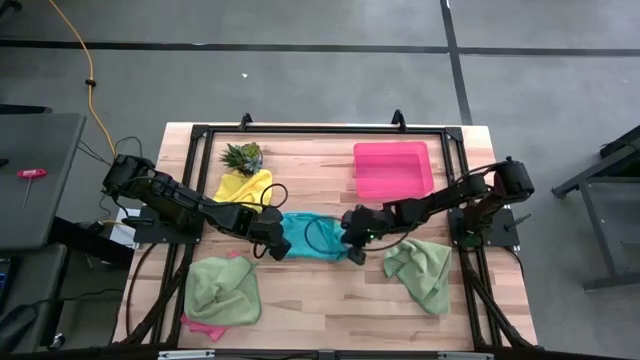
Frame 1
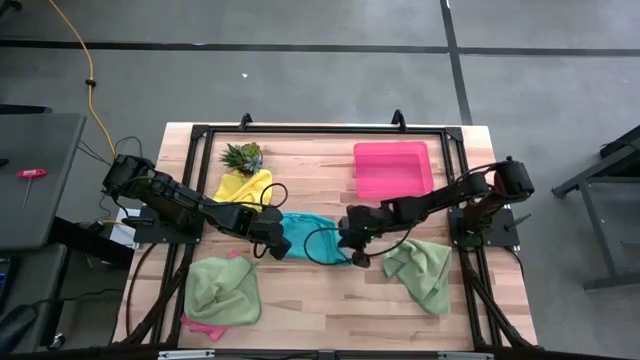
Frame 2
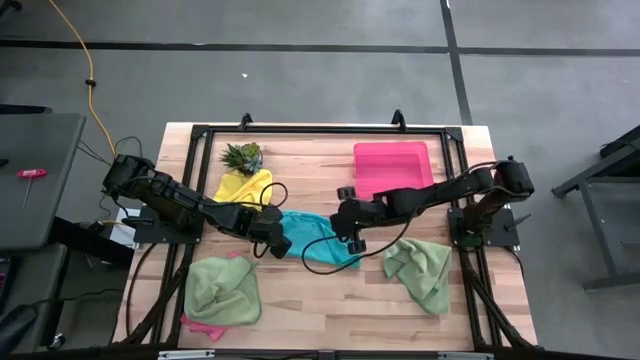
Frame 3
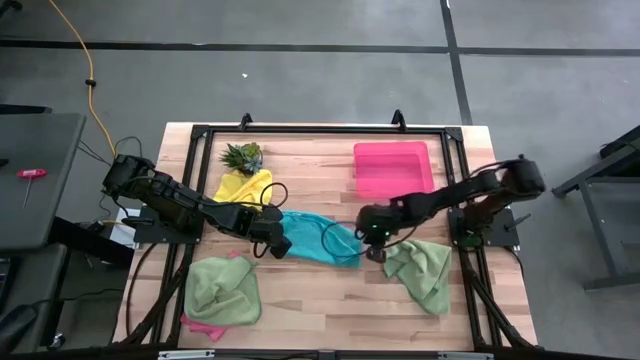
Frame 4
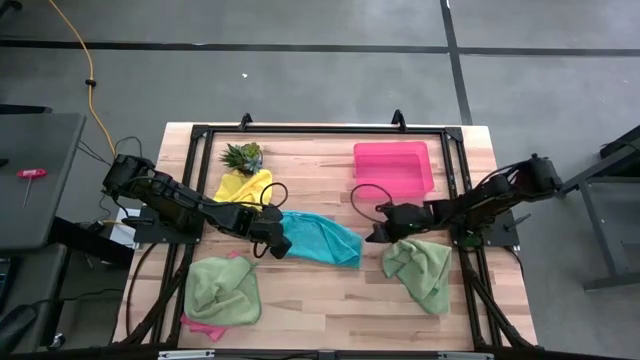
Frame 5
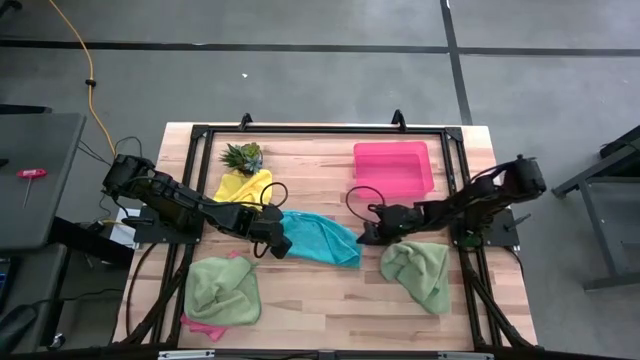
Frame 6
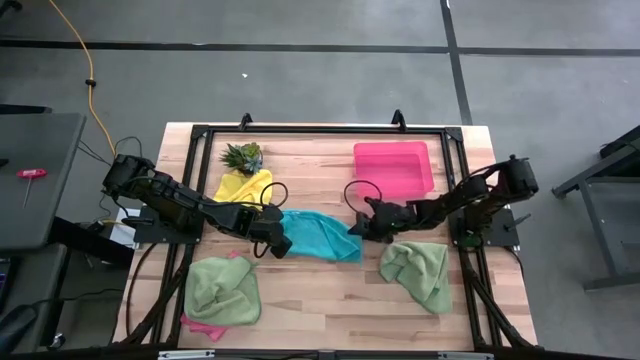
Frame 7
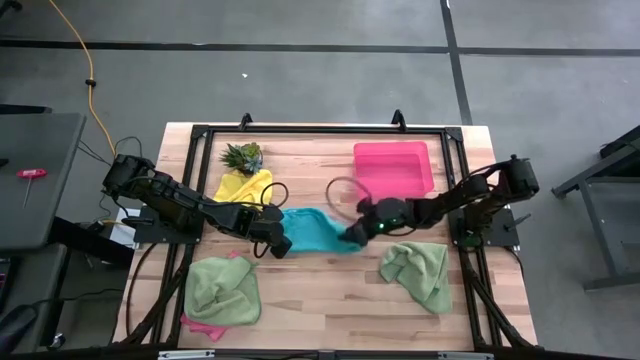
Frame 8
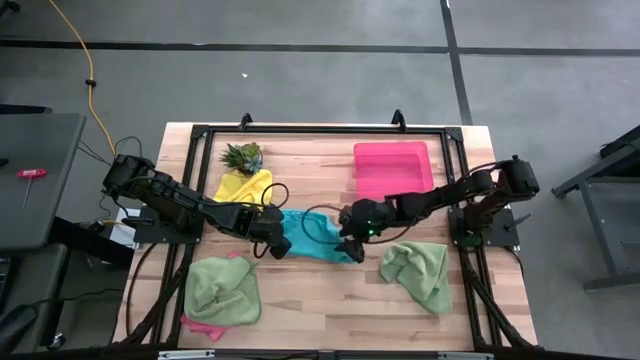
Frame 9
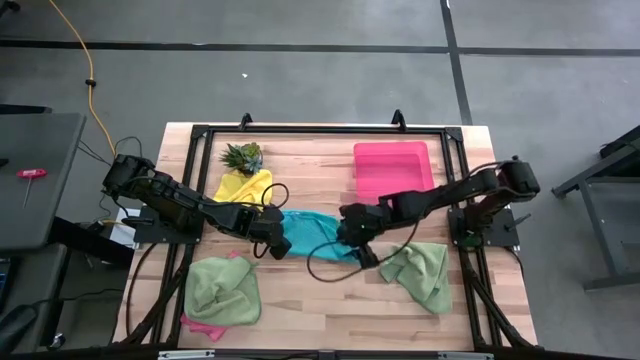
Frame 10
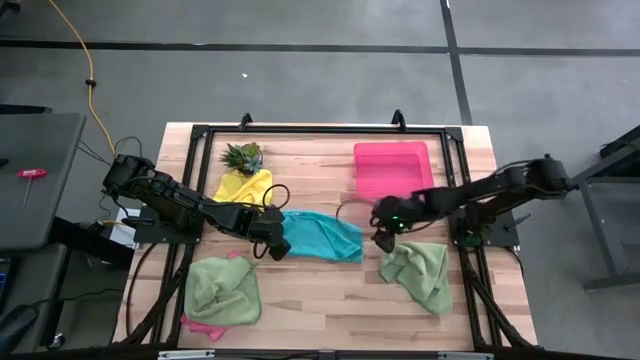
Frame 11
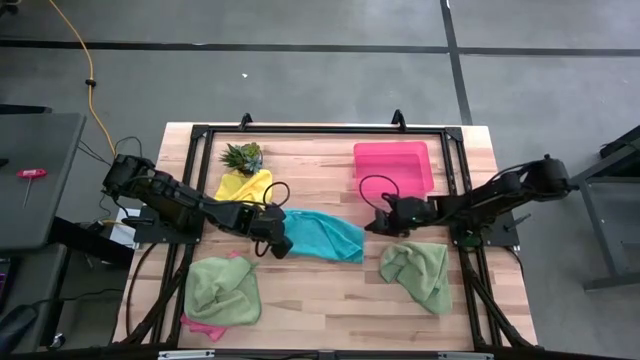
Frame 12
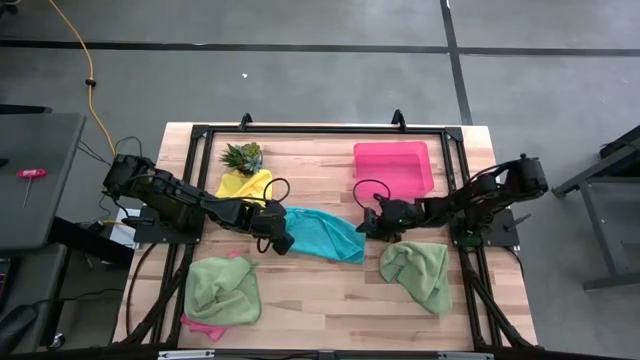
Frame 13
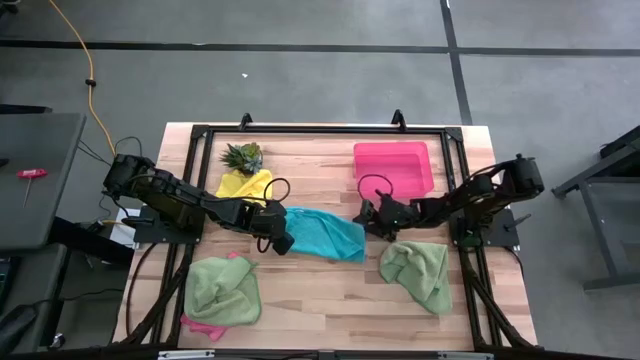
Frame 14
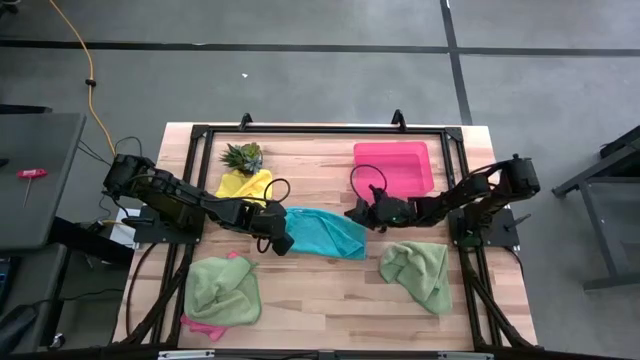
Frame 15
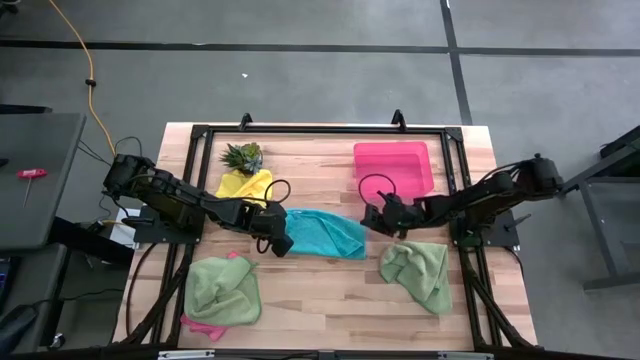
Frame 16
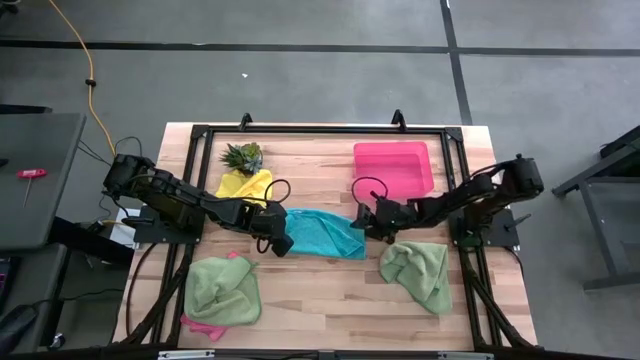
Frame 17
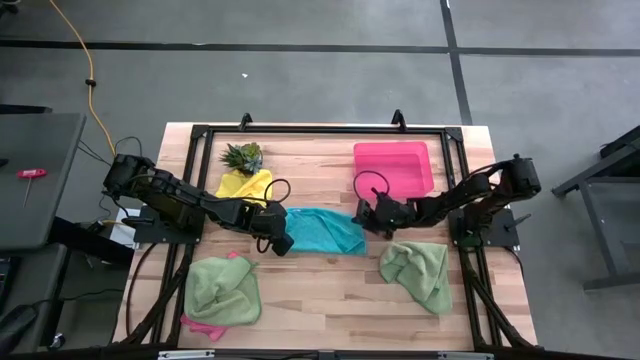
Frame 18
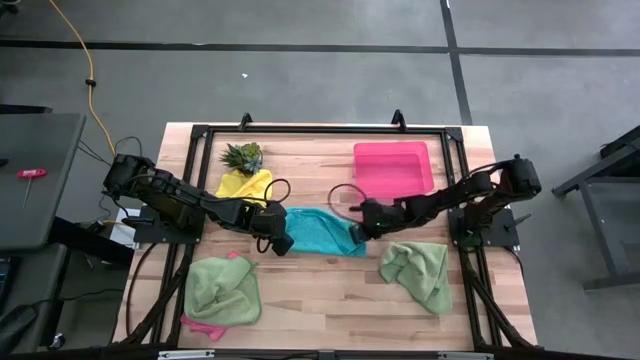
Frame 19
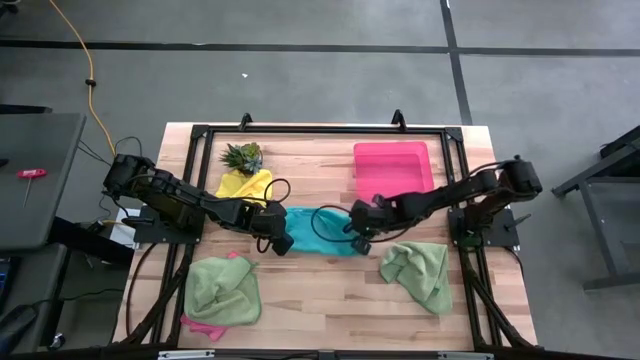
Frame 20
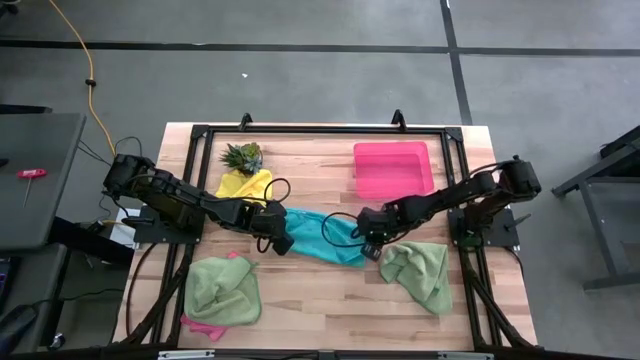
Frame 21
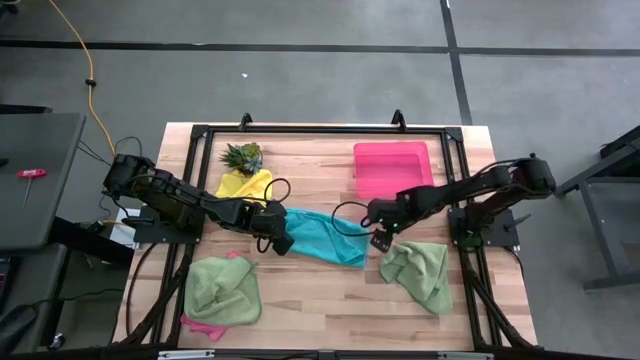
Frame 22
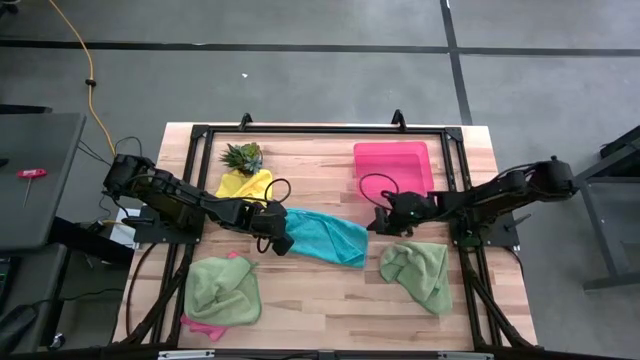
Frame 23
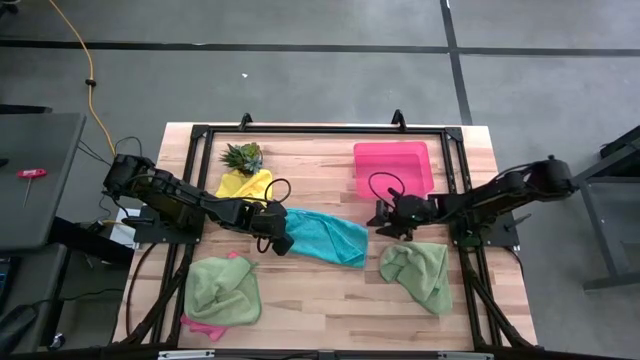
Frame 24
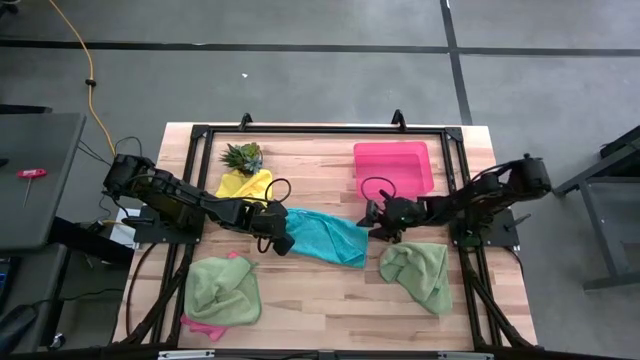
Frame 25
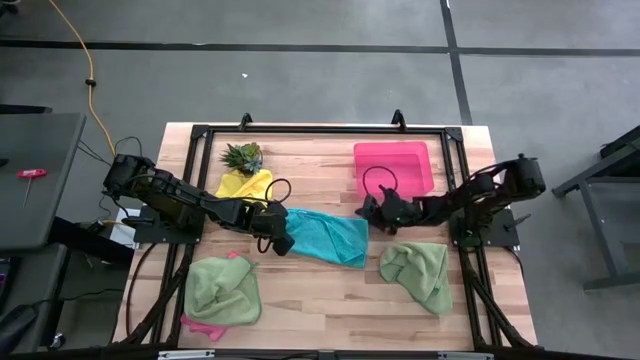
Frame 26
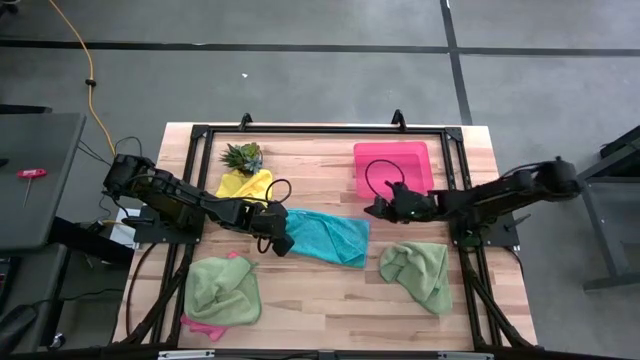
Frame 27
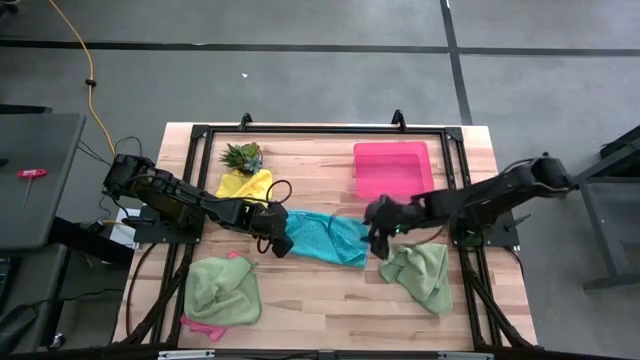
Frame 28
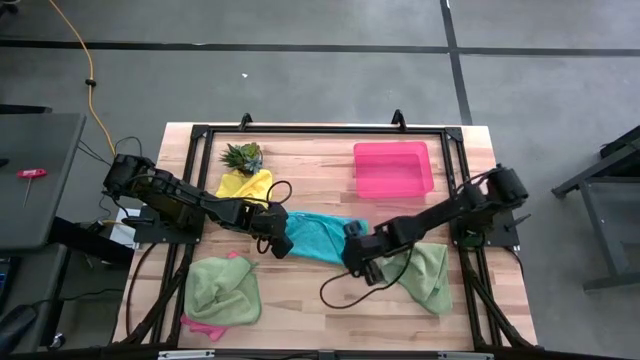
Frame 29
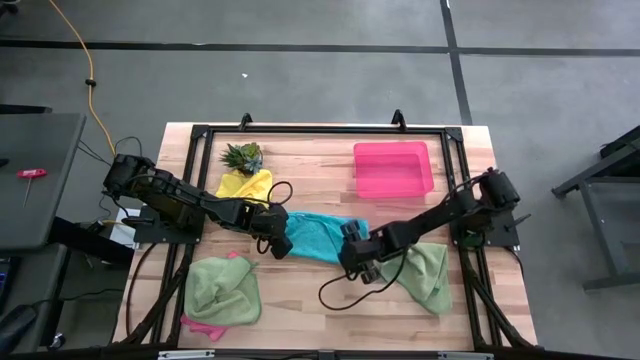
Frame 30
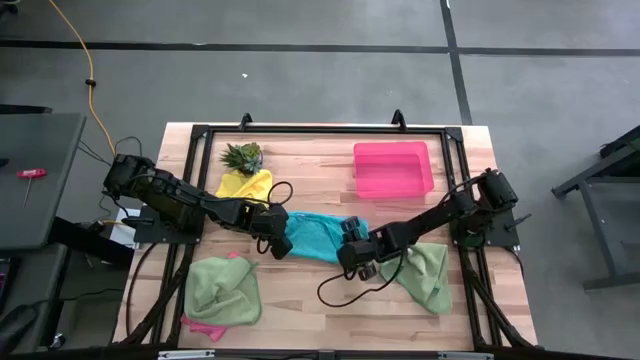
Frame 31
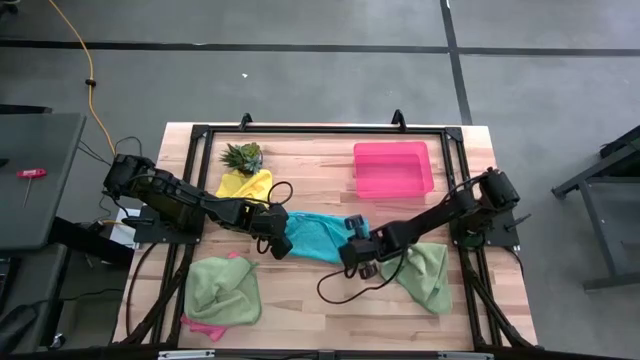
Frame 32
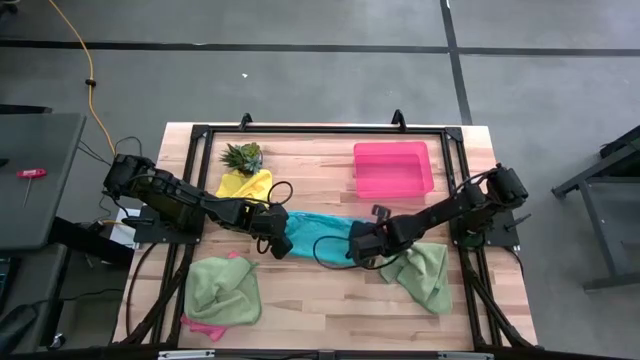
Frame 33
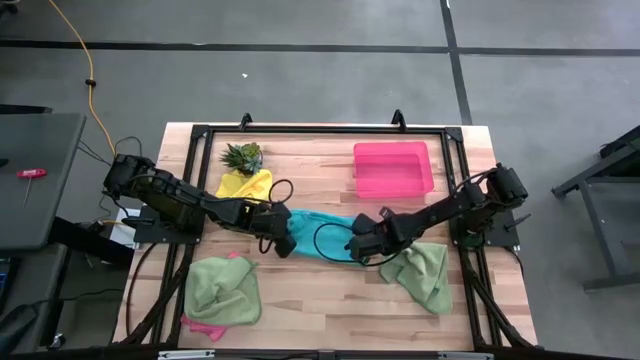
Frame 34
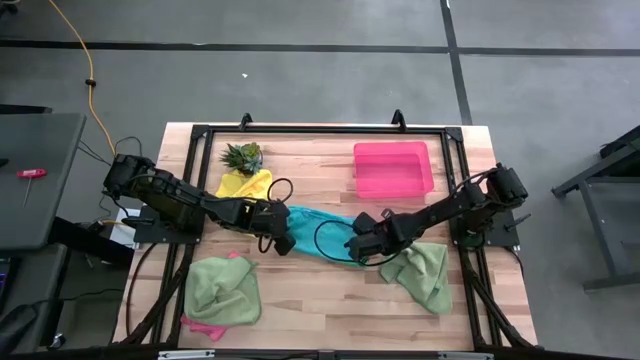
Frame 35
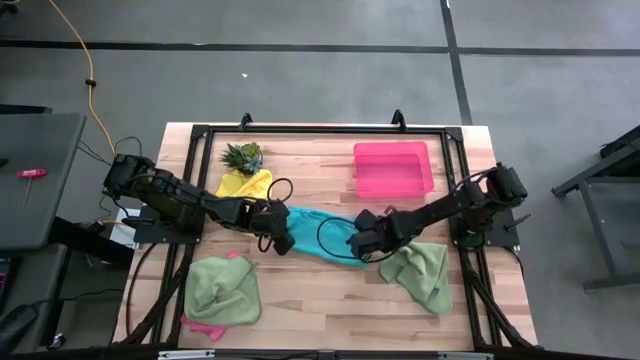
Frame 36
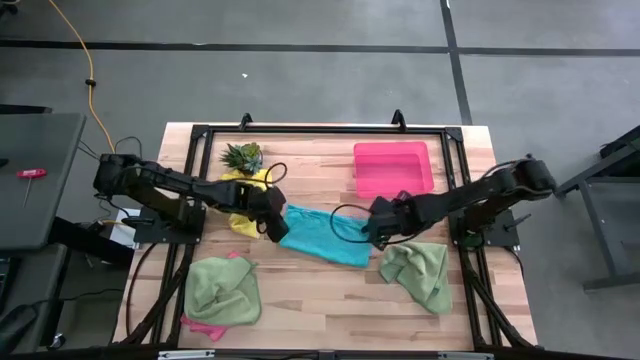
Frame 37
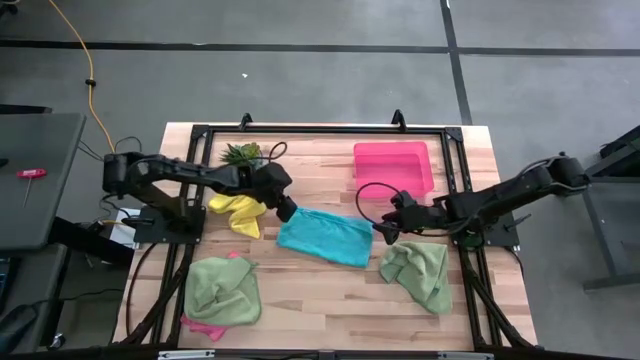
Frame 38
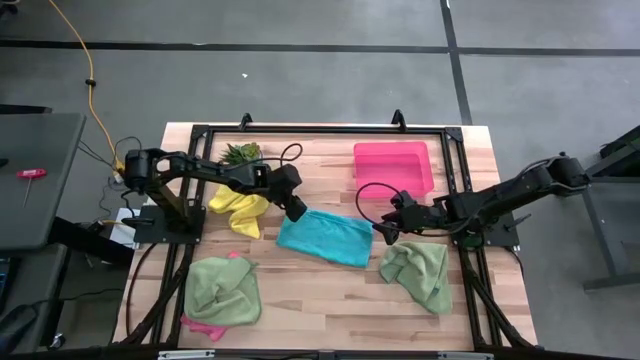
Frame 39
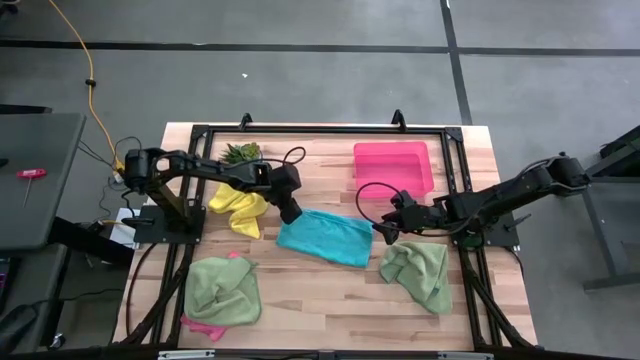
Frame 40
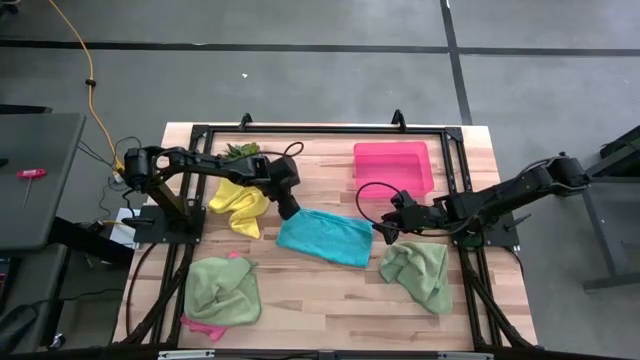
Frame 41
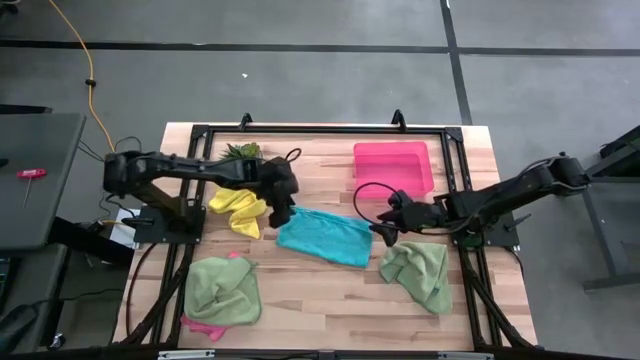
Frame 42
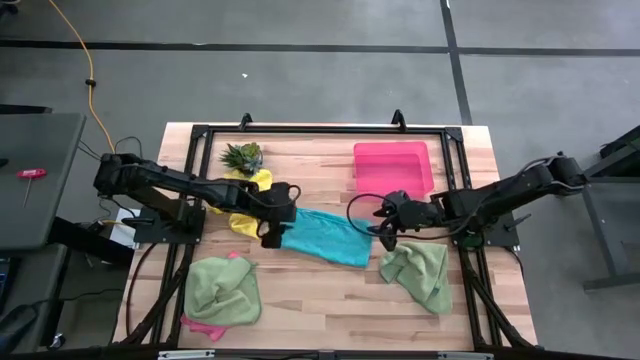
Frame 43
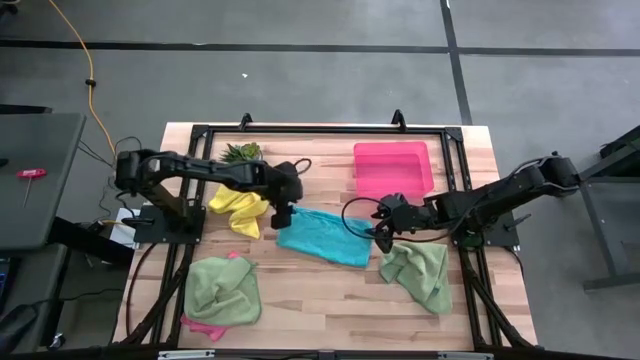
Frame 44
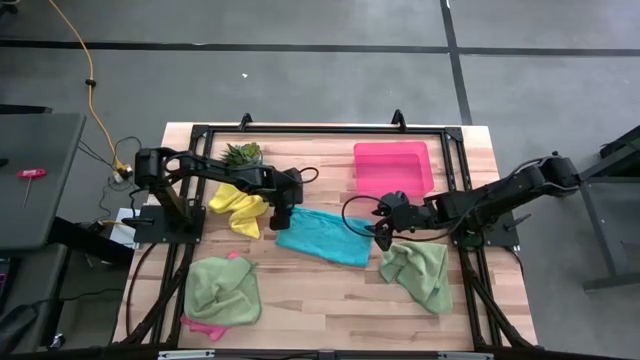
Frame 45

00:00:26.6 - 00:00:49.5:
Task: Fold microfiber towels
Fold the blue microfiber cloth
